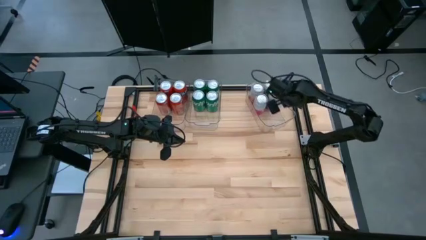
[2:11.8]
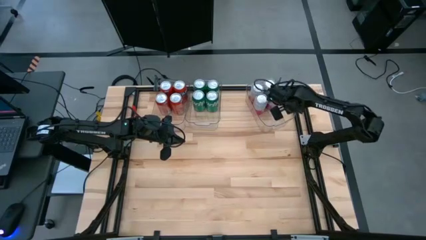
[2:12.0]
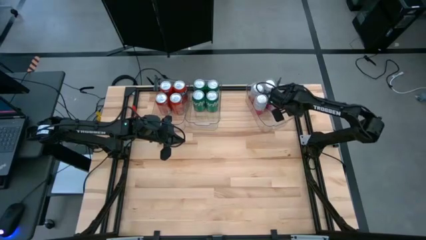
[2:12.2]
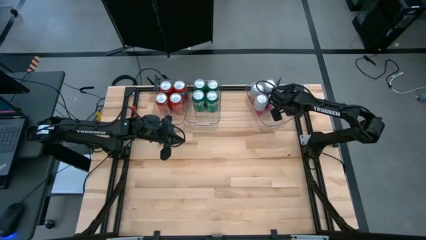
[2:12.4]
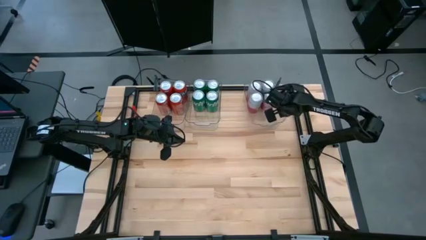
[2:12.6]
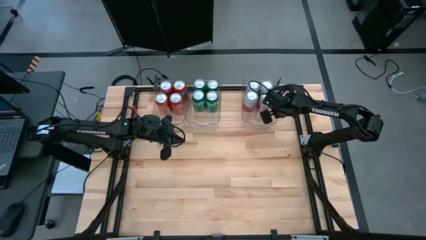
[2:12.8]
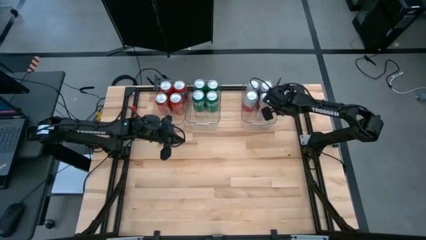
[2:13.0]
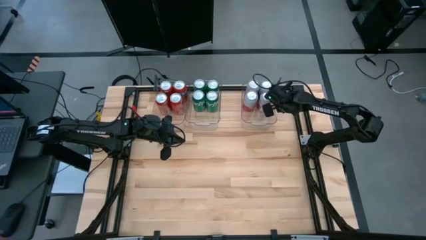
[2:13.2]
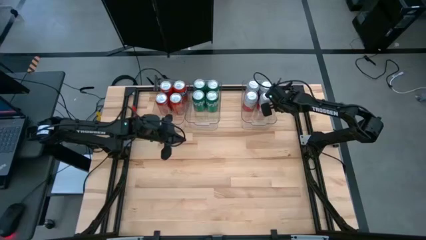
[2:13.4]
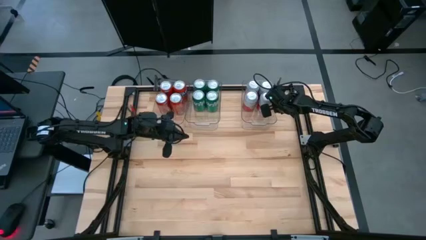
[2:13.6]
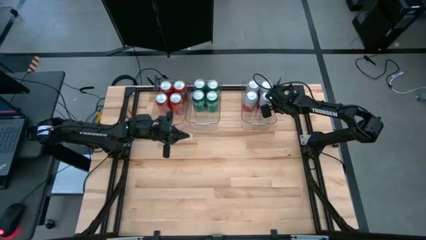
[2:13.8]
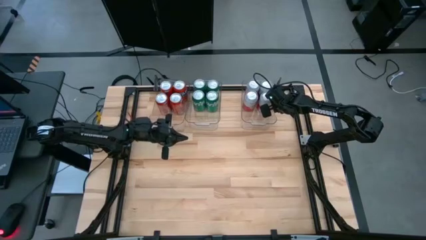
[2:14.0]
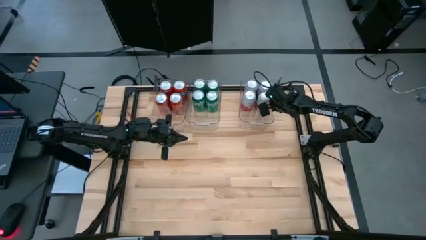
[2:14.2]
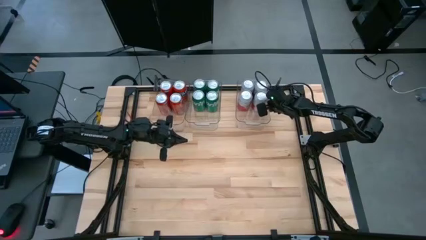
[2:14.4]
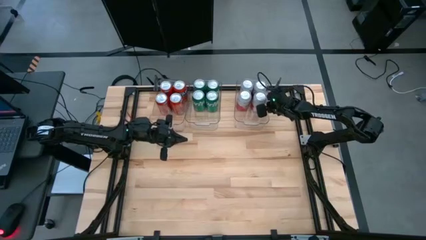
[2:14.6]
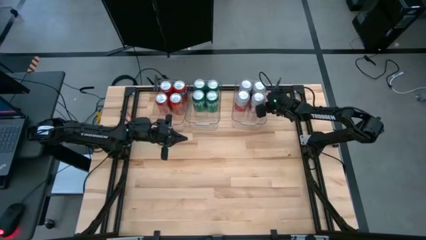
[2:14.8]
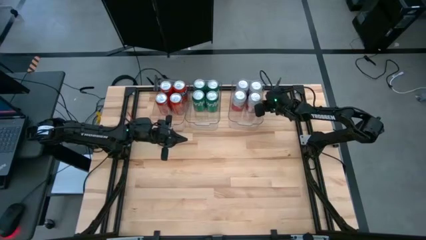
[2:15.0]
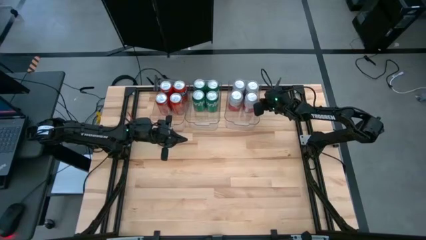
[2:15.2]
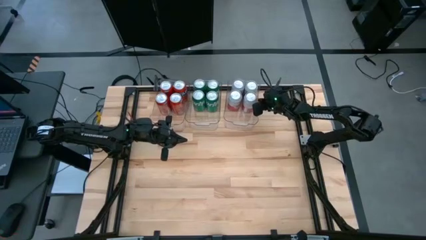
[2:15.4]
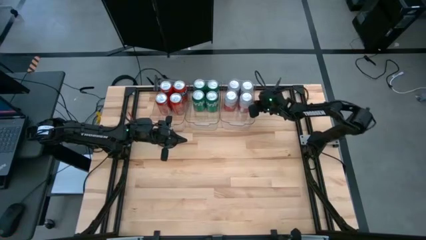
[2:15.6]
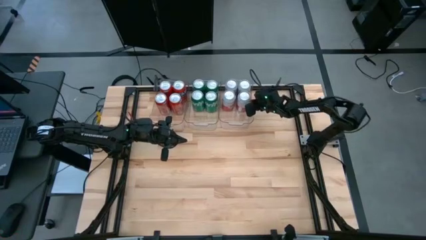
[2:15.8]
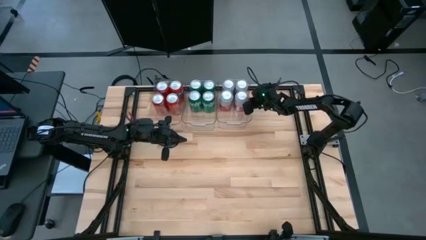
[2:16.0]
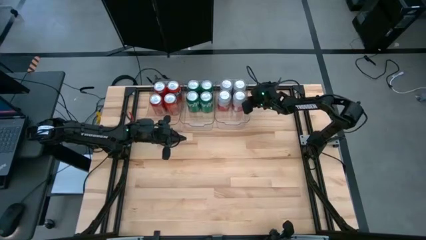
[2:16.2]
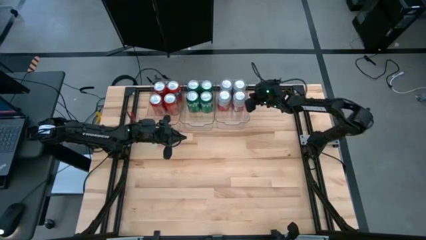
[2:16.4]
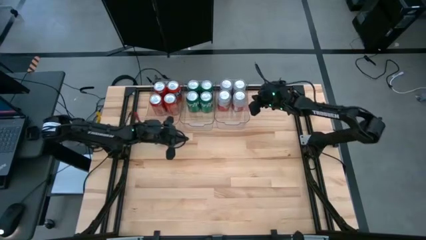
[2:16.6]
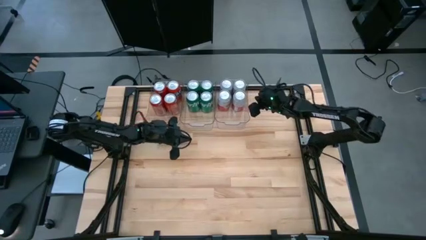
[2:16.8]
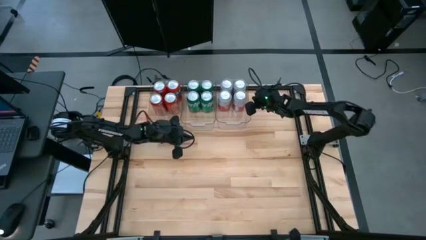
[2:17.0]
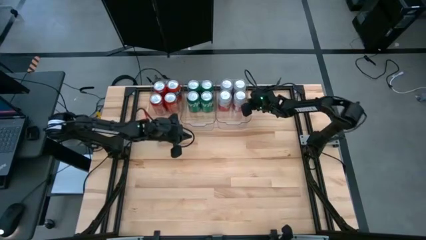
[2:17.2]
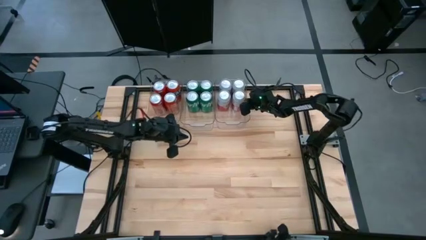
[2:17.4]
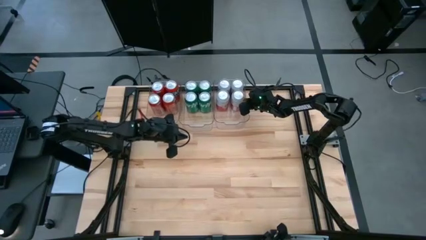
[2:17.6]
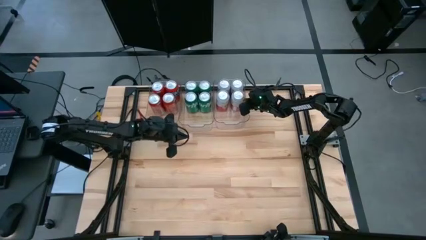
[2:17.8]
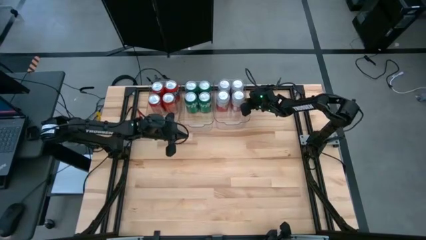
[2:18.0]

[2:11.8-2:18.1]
Task: Sort soda cans
Adjust the transparent bins

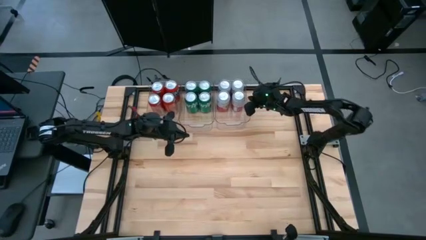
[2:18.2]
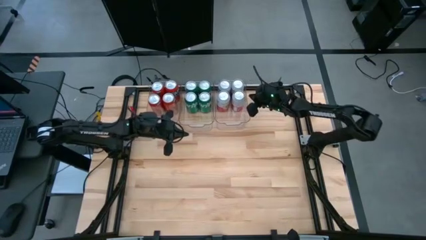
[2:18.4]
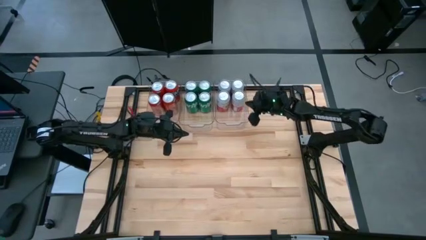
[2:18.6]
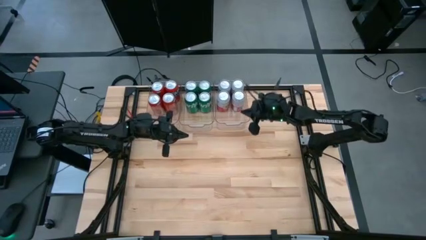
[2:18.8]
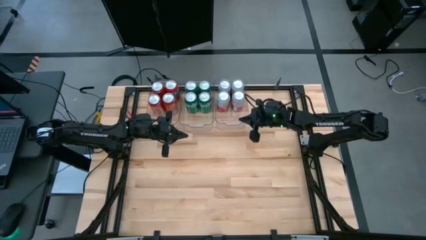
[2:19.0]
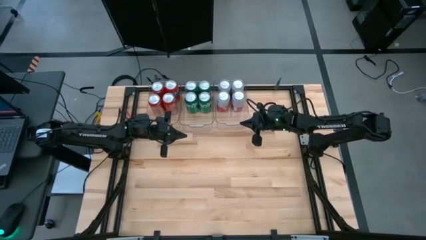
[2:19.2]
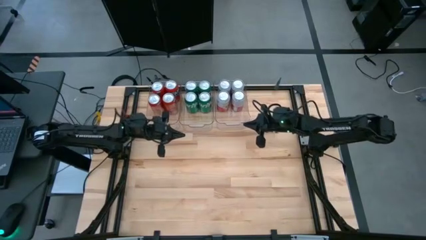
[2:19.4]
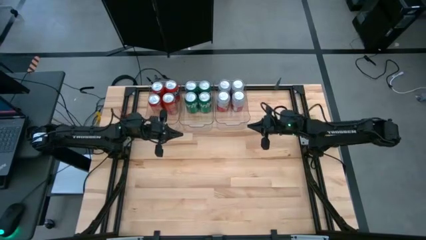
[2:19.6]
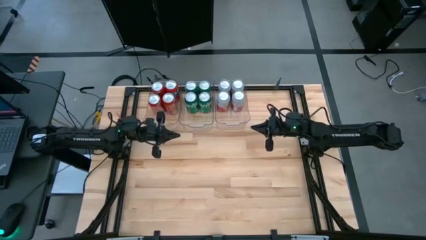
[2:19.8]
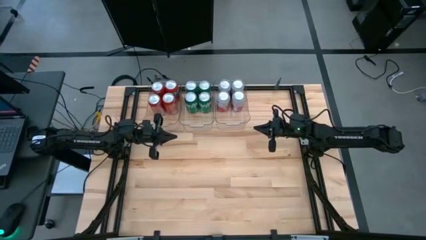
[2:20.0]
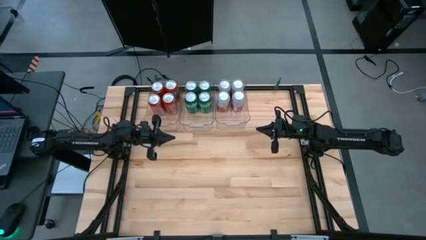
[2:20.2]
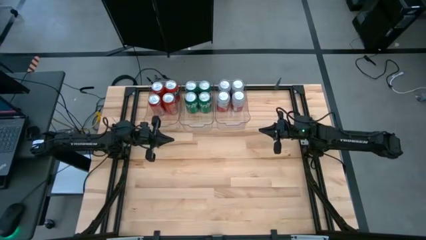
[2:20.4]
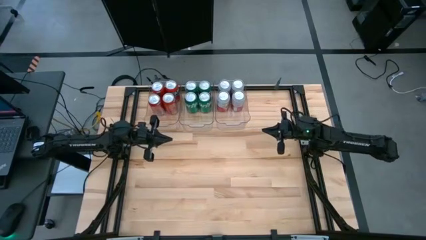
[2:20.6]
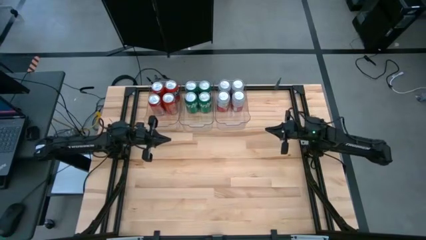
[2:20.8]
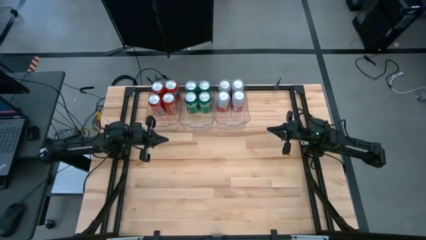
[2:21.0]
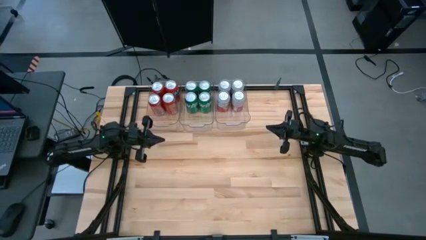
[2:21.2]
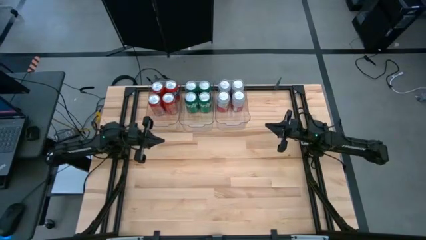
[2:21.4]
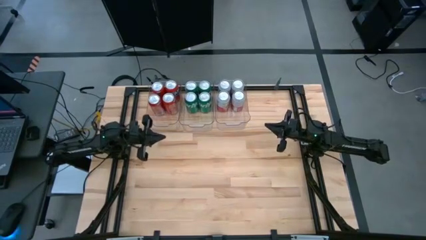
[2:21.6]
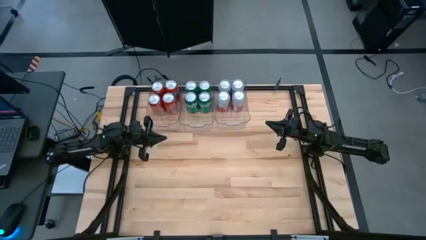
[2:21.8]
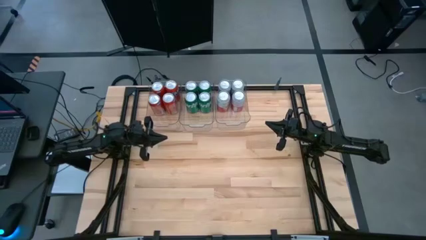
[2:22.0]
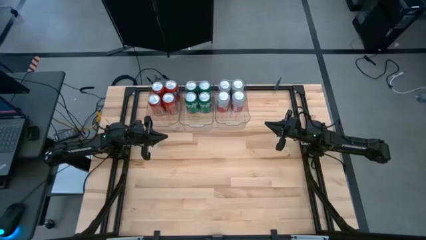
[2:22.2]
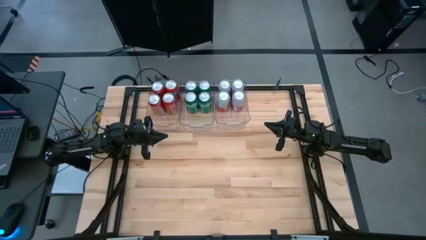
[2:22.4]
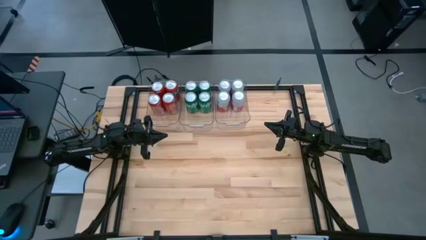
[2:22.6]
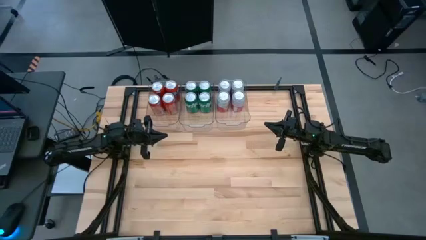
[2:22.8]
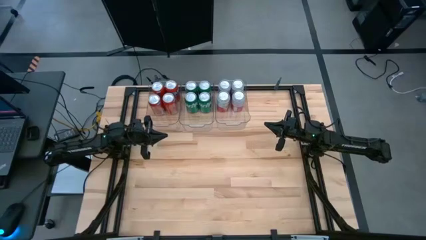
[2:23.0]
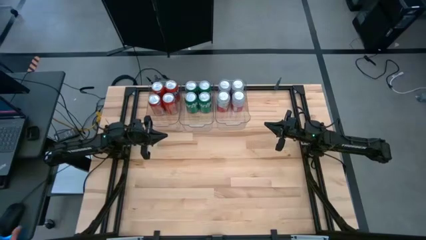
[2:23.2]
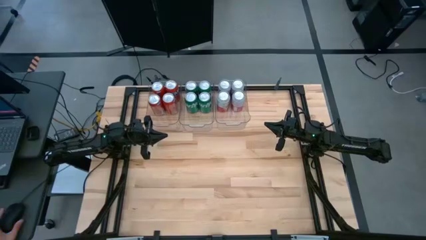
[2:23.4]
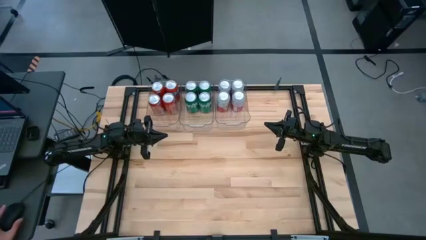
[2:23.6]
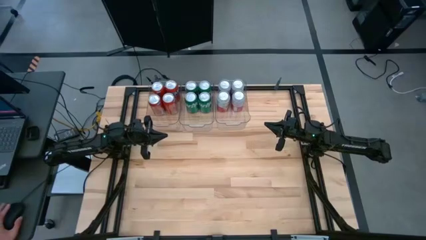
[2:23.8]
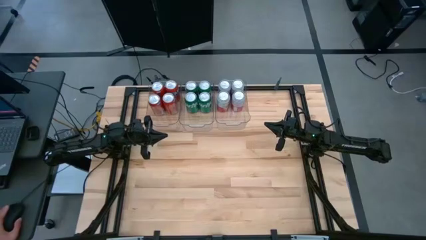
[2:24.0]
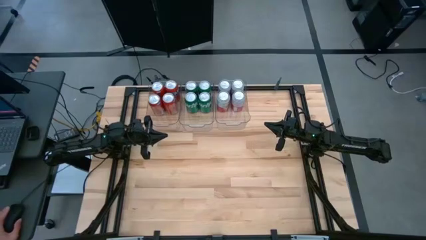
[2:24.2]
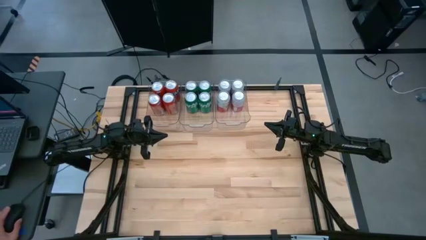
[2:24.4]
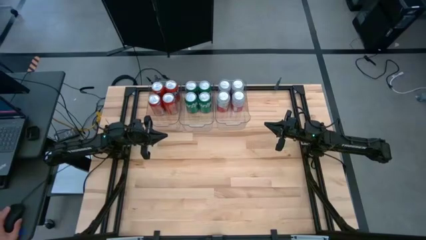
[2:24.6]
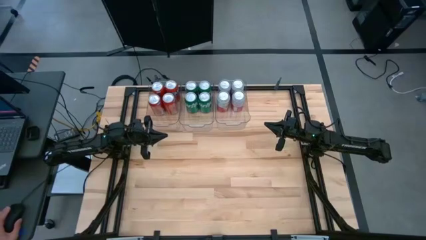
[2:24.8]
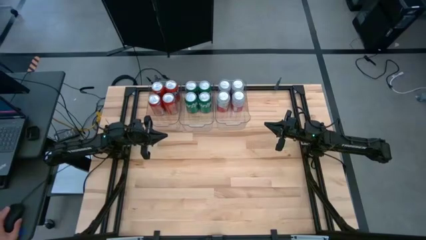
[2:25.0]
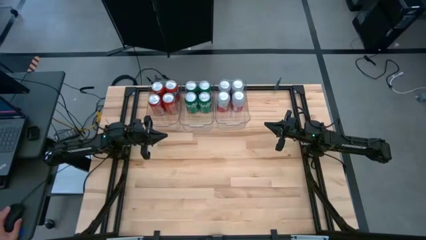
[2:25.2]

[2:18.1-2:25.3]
Return to Home Position
